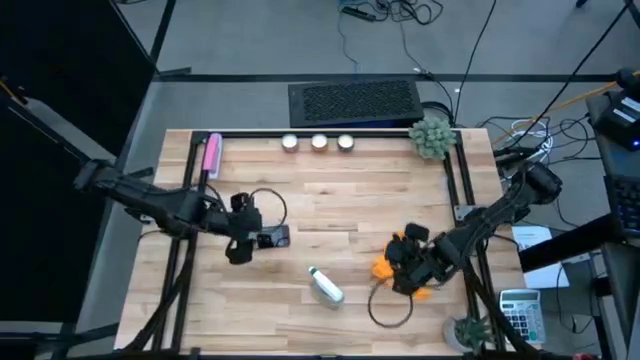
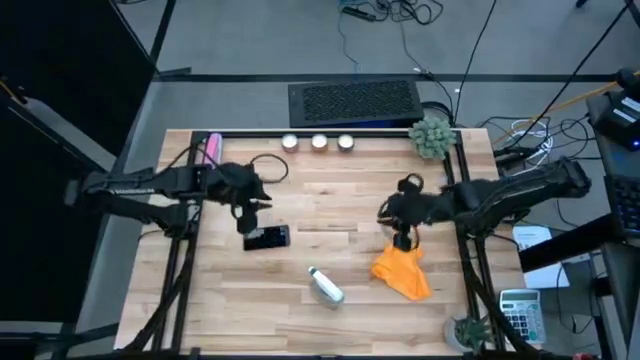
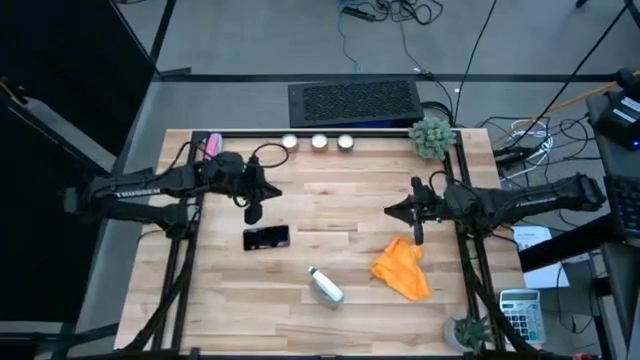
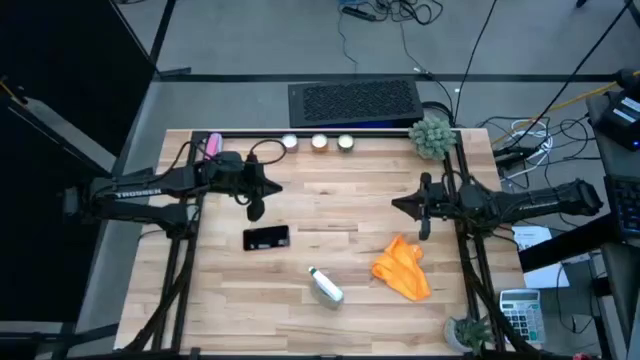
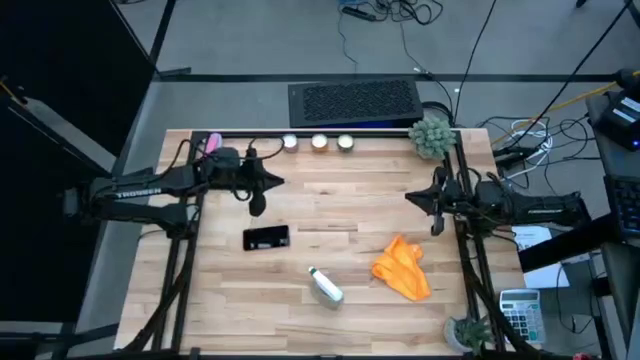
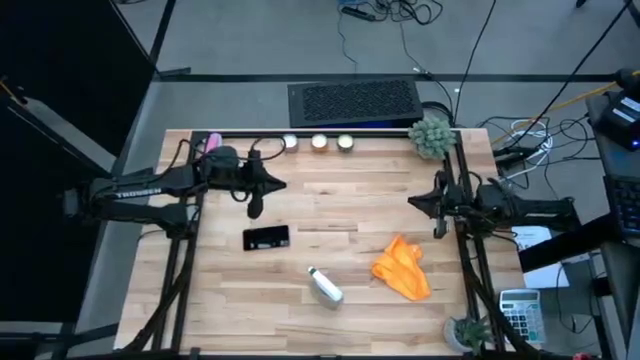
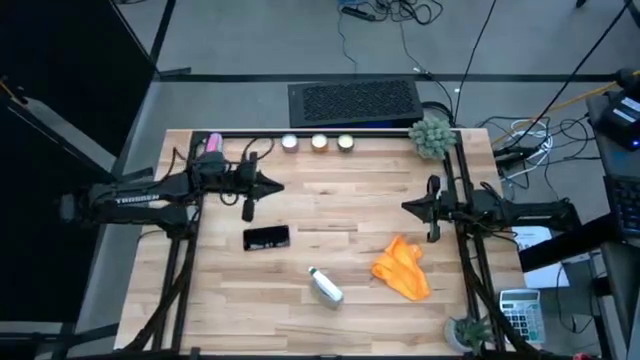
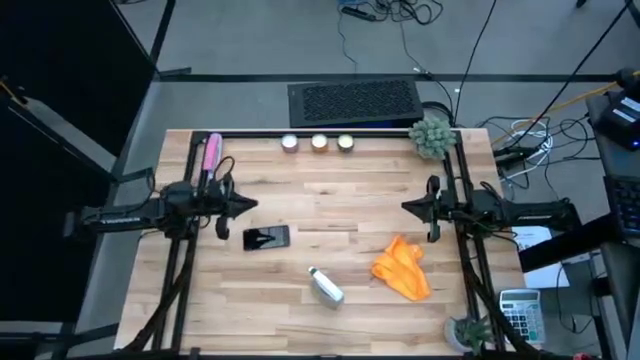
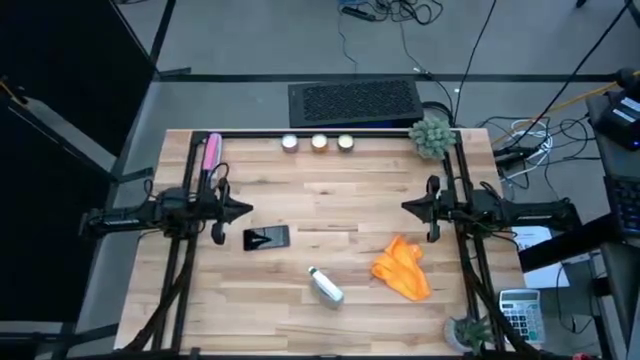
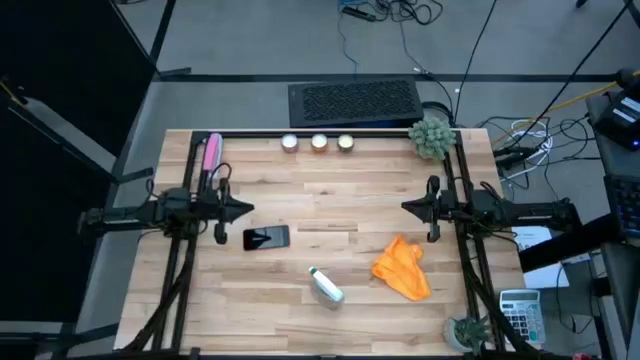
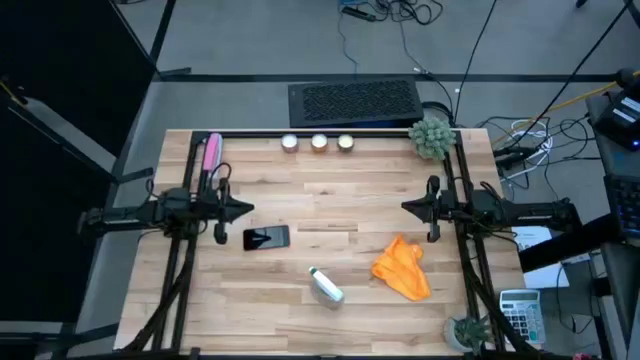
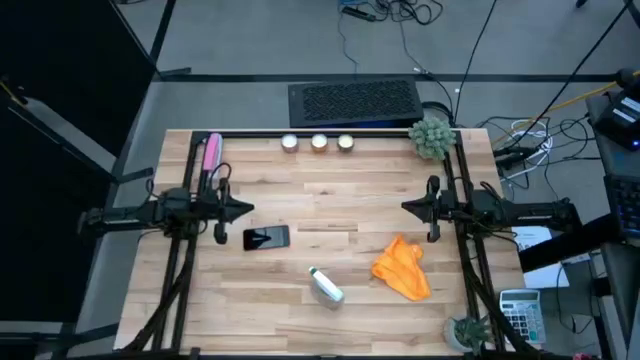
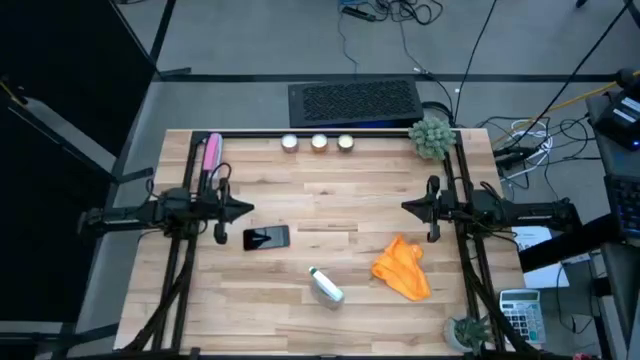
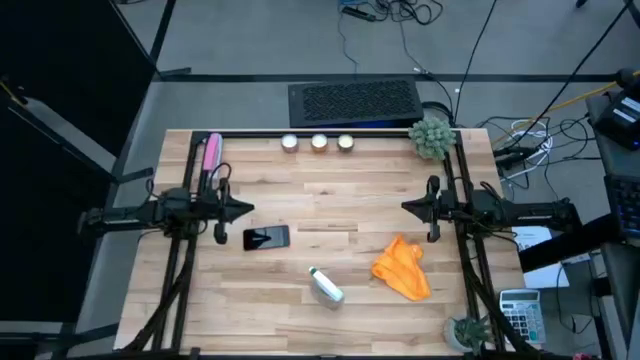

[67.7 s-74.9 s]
Task: Apply microfiber cloth
Return to Home Position

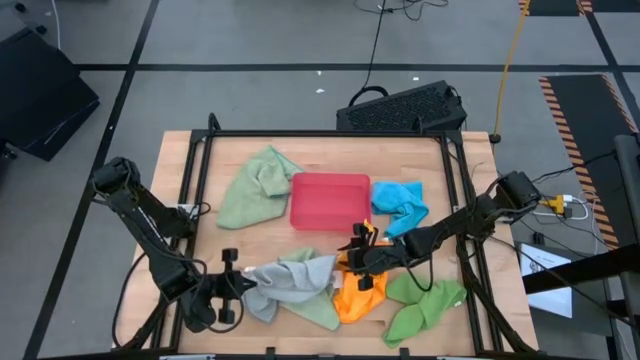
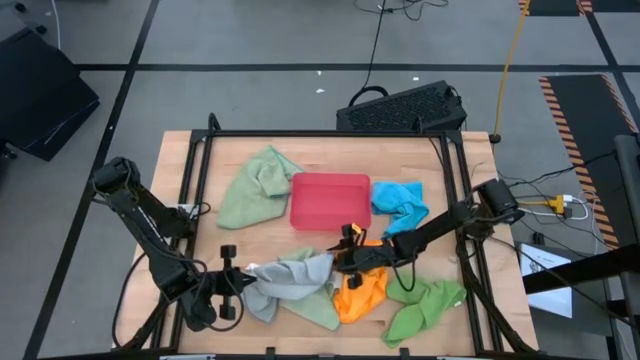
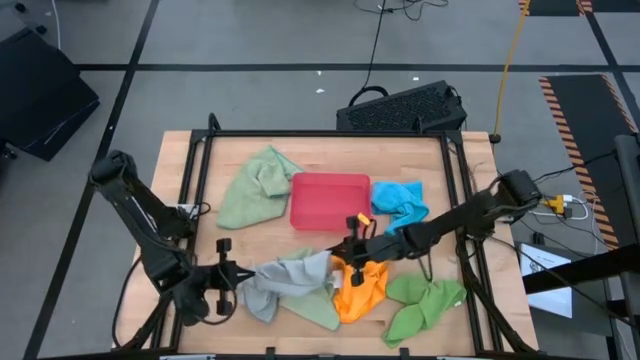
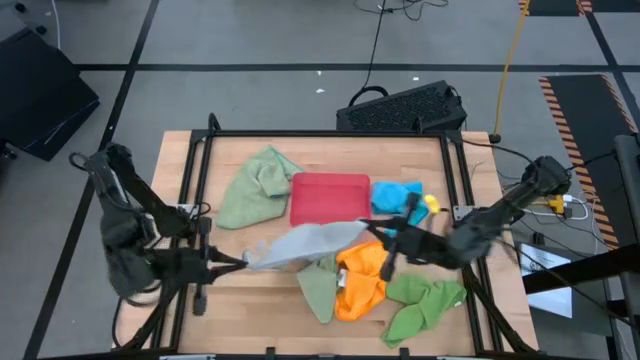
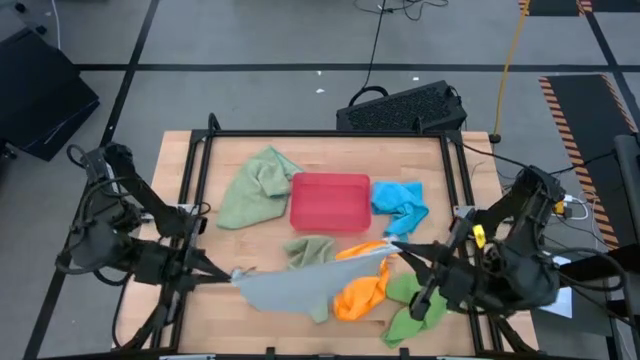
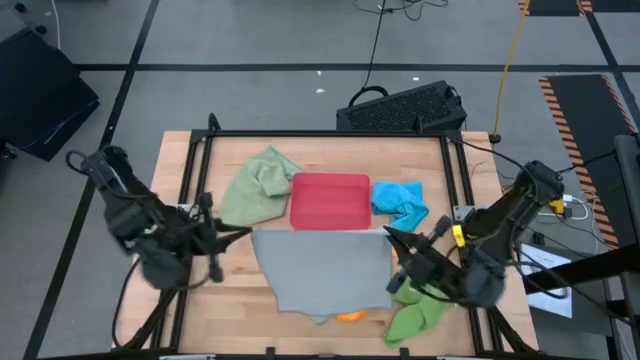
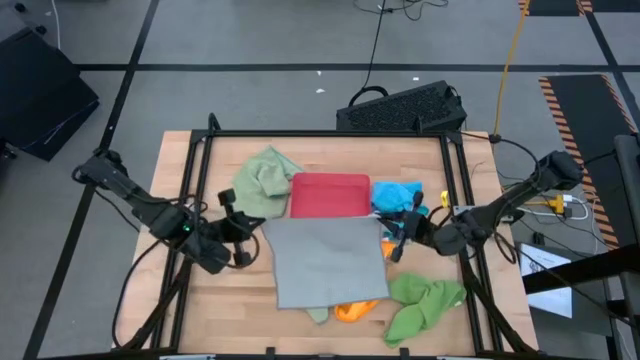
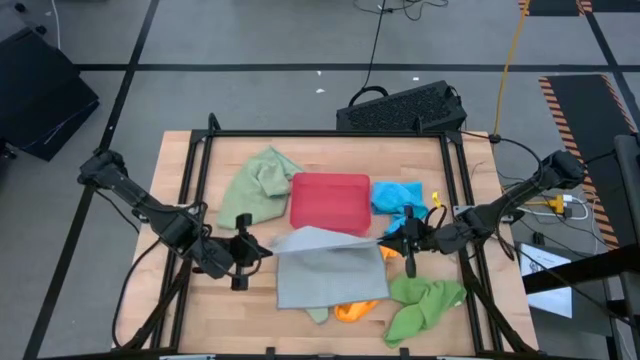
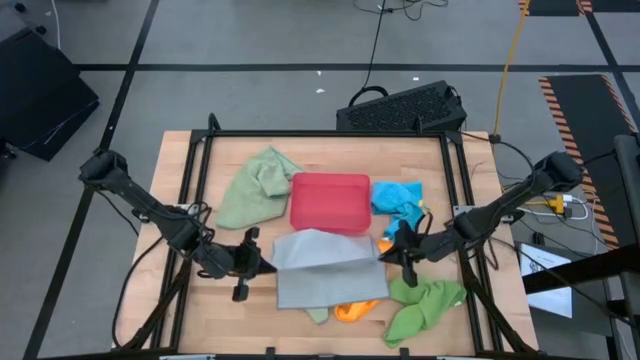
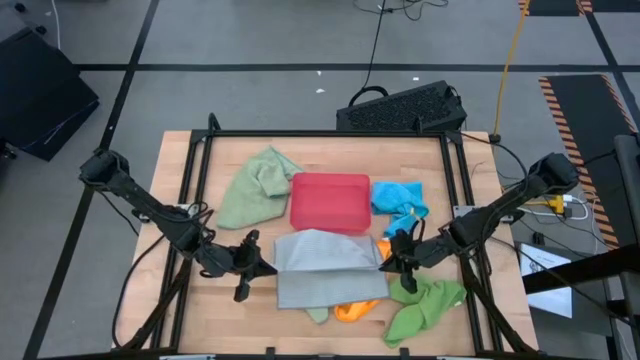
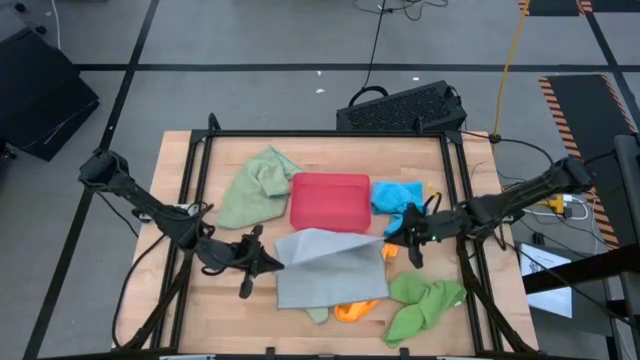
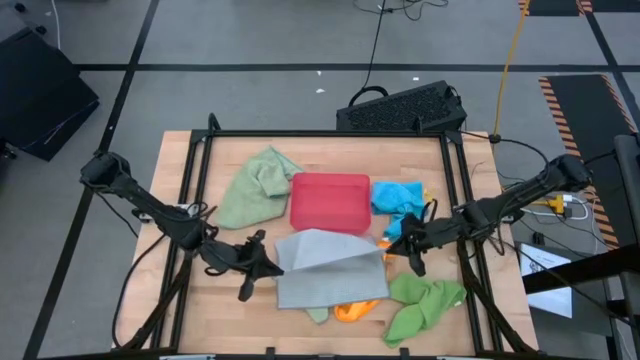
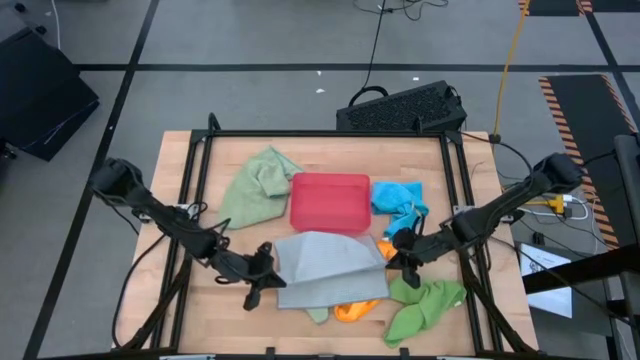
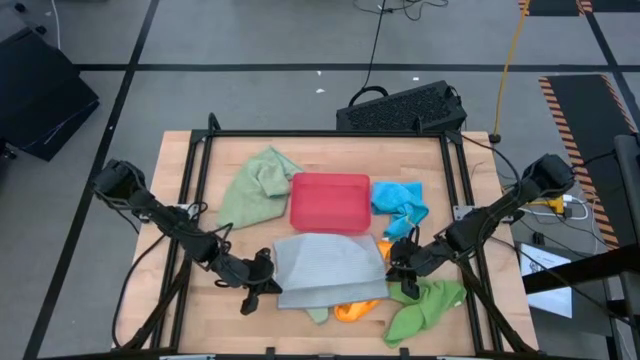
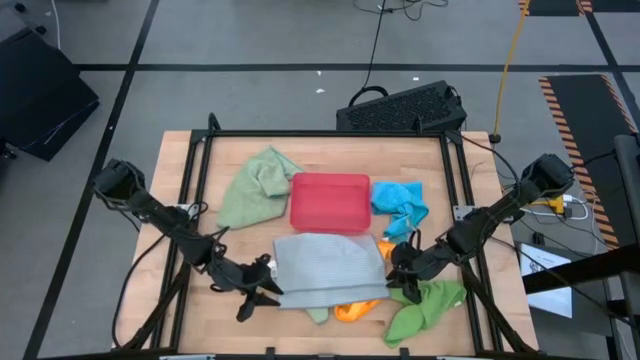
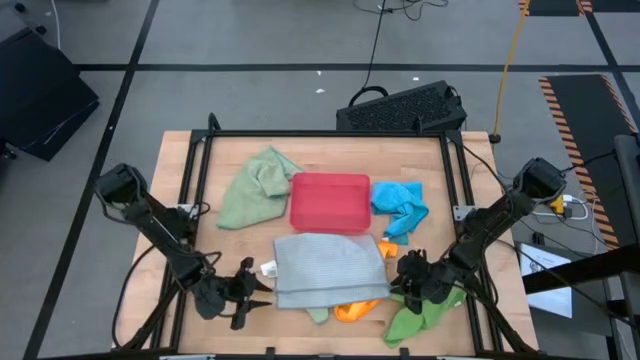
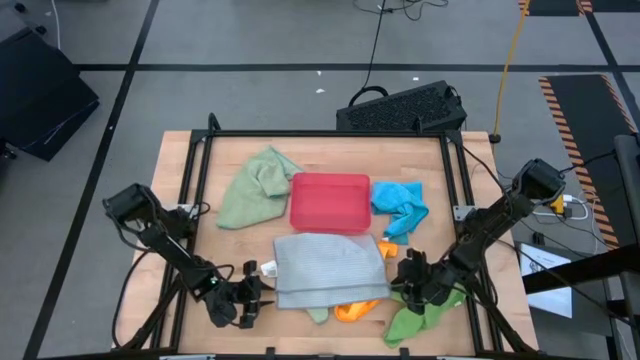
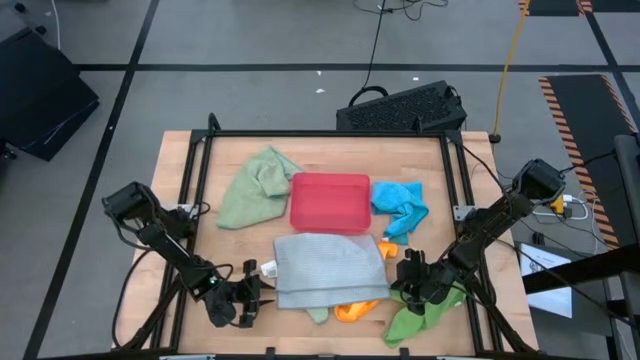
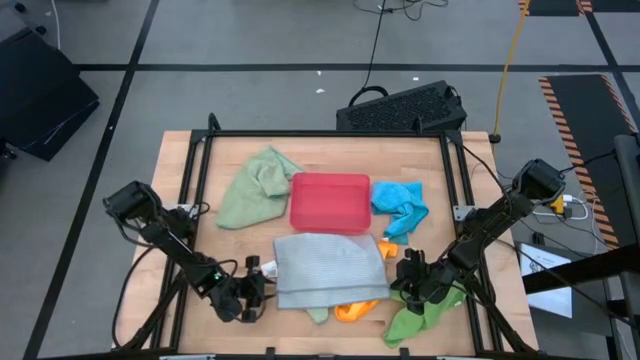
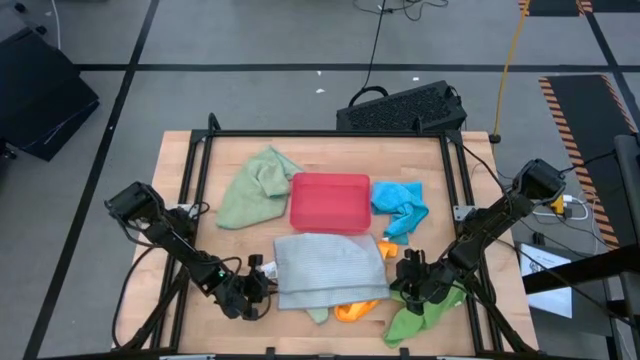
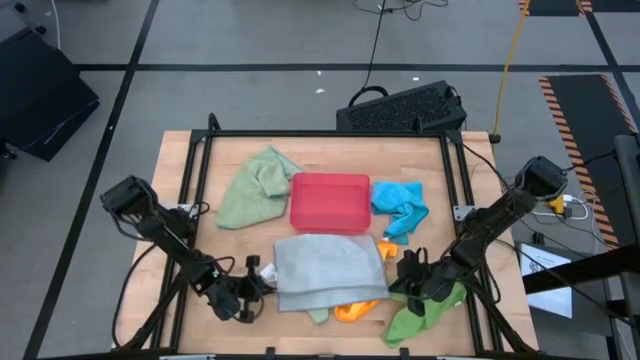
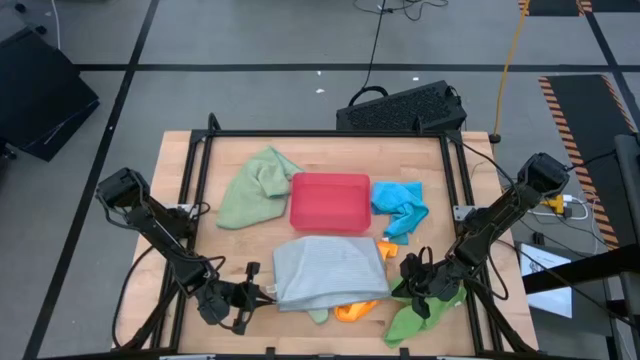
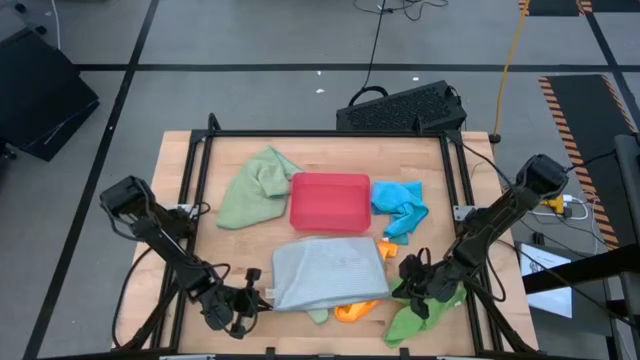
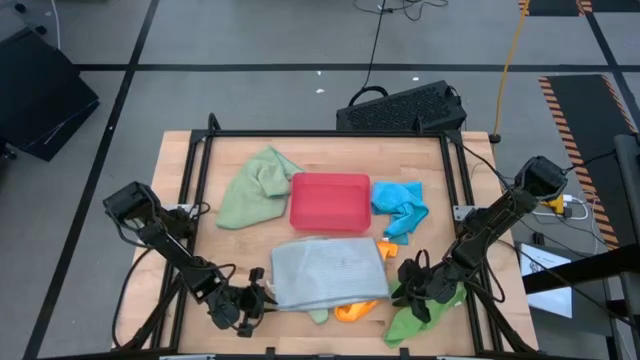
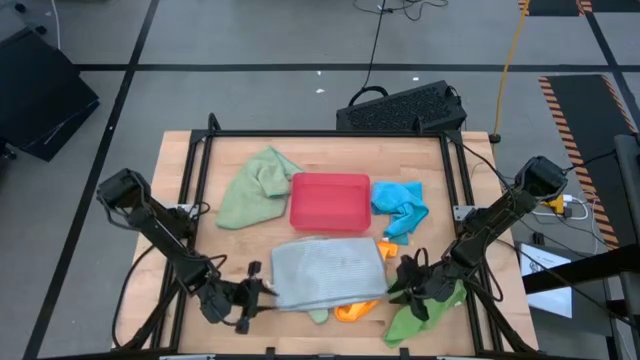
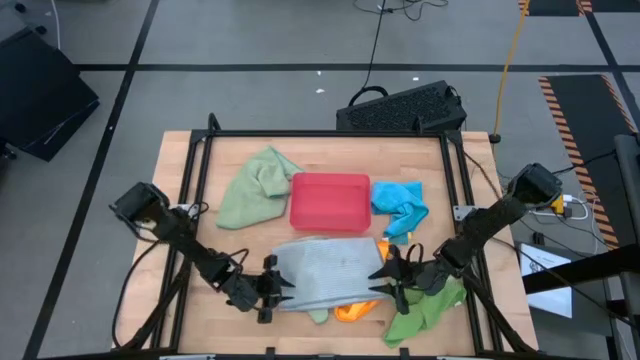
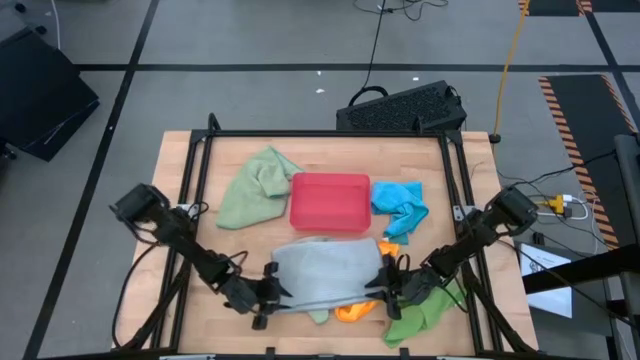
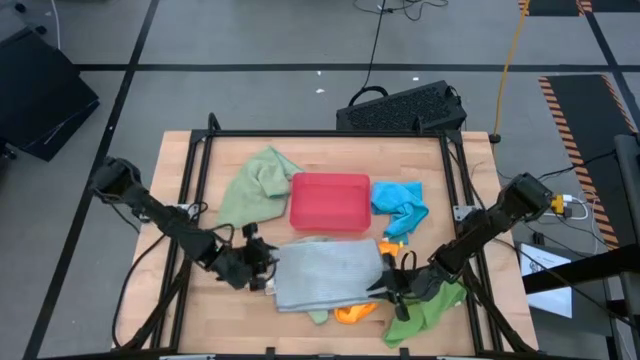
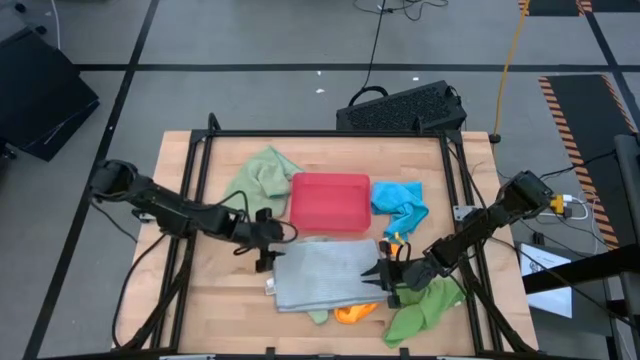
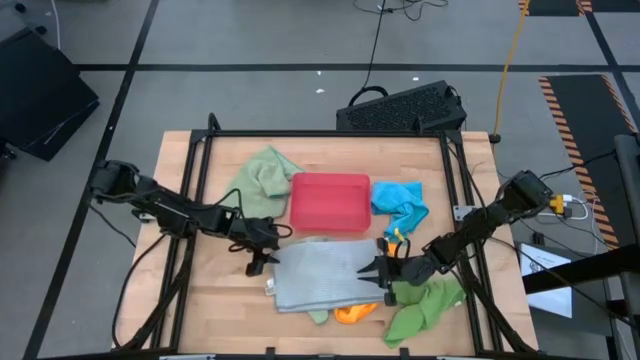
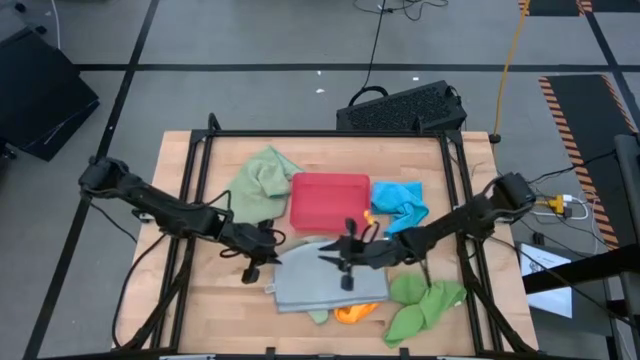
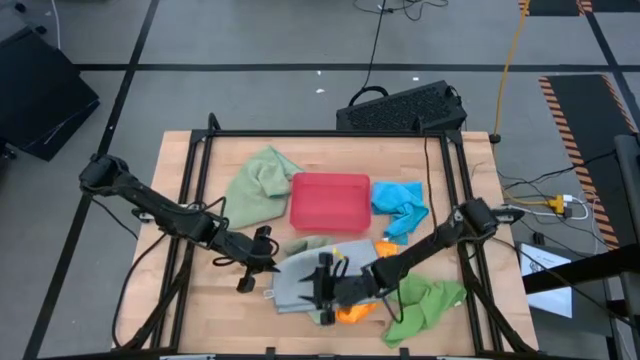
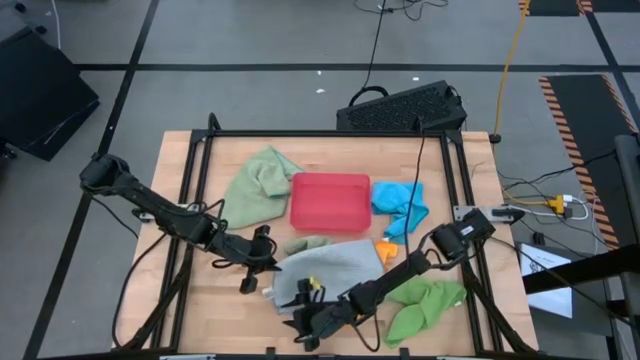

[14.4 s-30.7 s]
Task: Fold microfiber towels
Fold the gray microfiber cloth
